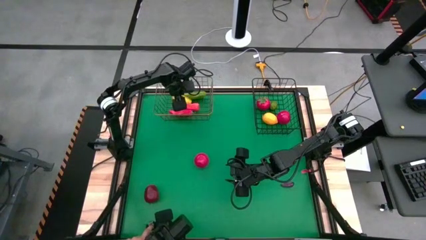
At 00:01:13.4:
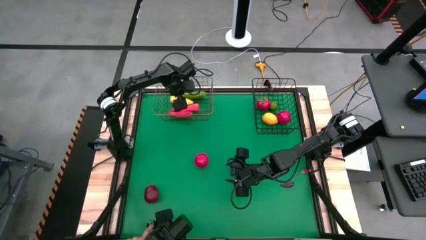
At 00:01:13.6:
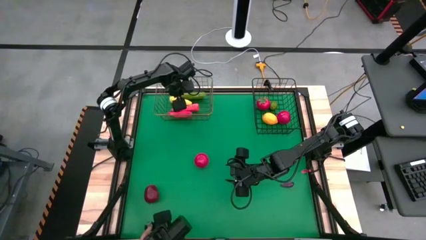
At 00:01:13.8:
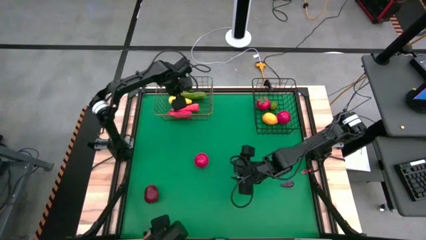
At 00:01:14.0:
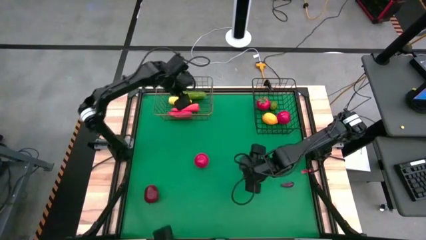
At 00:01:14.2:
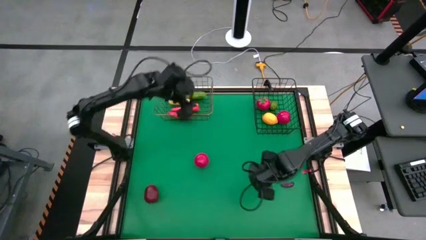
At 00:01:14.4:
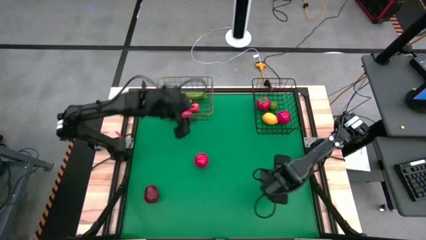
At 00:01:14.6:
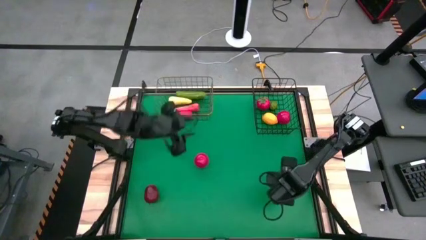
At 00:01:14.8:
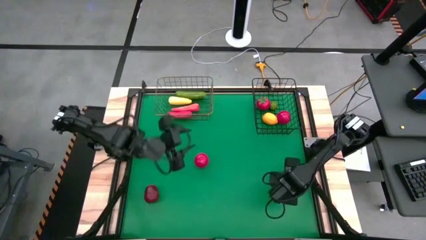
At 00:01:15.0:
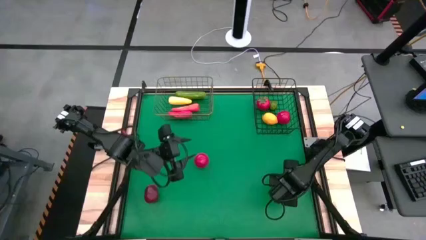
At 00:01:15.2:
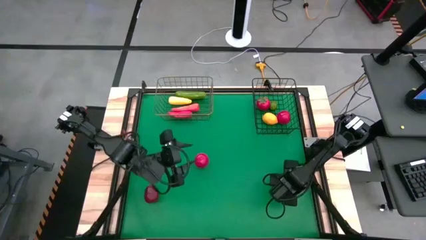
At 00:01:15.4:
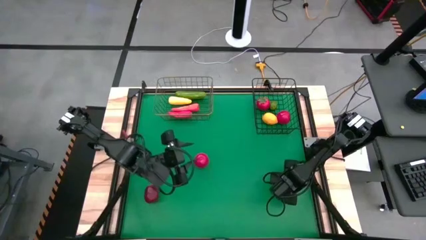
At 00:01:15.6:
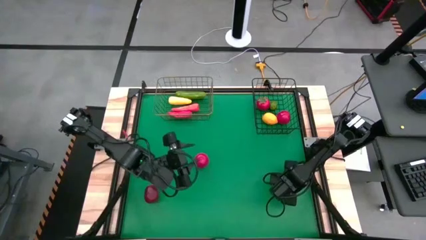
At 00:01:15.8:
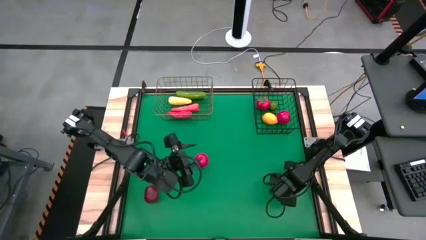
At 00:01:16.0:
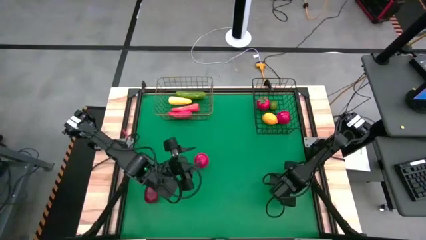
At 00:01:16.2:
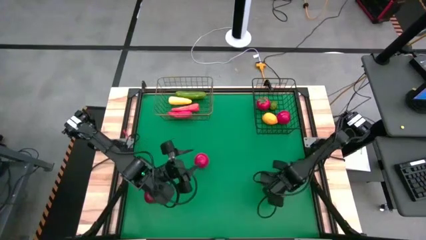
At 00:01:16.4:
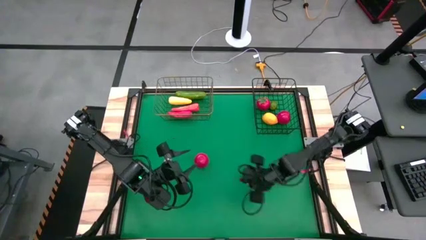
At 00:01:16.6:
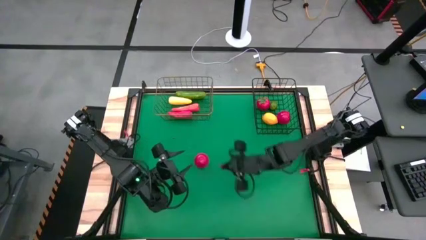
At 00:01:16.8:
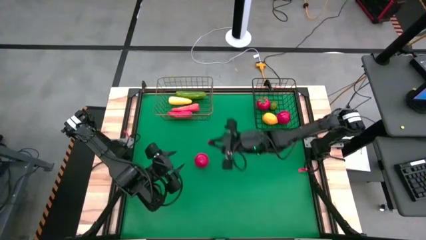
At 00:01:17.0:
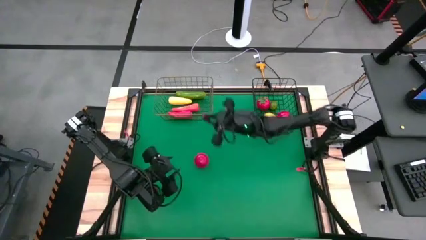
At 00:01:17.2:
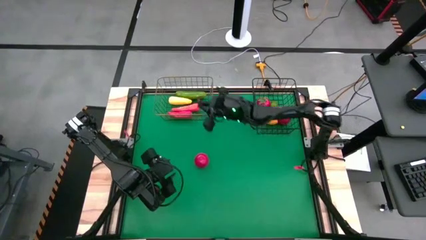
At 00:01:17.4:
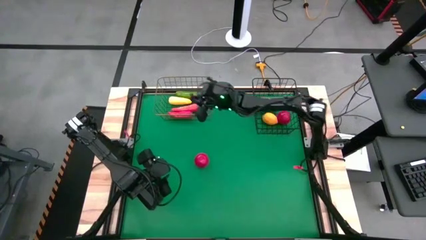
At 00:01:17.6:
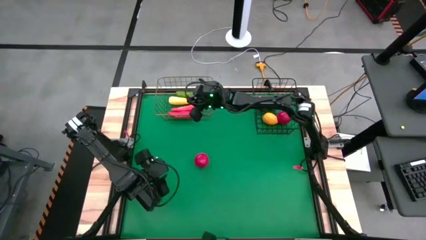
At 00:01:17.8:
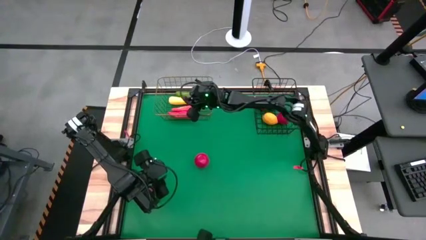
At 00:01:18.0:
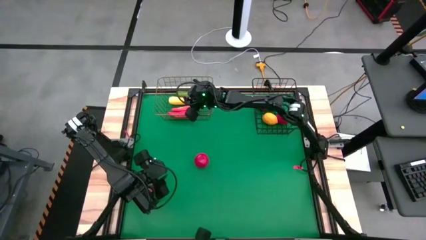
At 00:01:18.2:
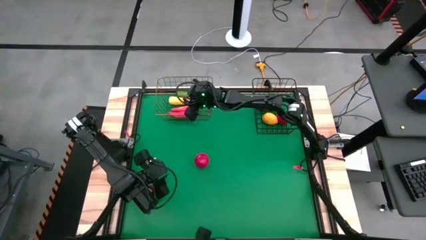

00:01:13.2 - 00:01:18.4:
Task: Sort produce into baskets
Put the purple eggplant into the gold wire basket

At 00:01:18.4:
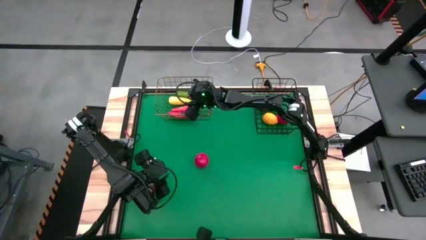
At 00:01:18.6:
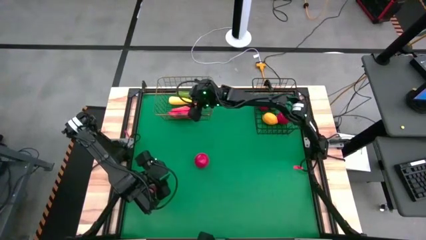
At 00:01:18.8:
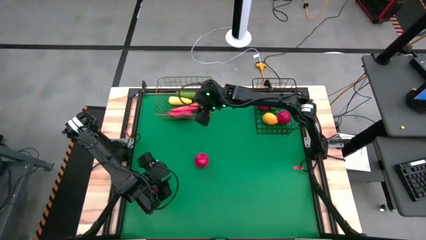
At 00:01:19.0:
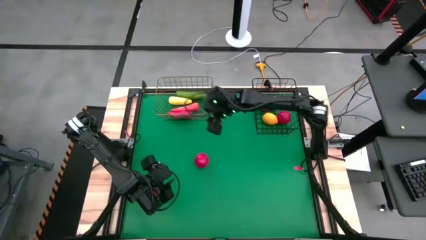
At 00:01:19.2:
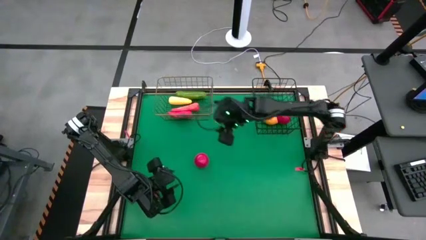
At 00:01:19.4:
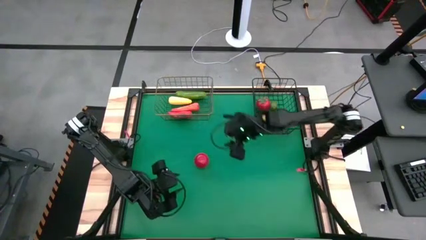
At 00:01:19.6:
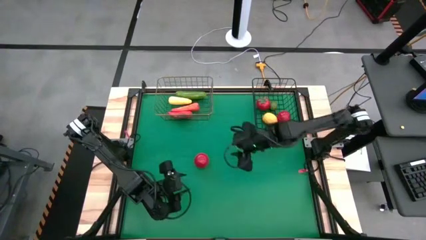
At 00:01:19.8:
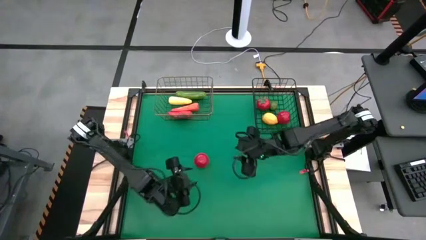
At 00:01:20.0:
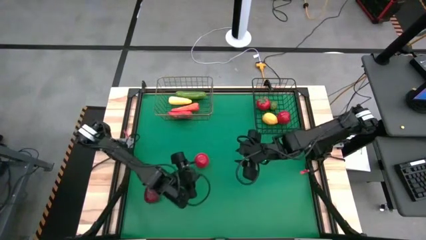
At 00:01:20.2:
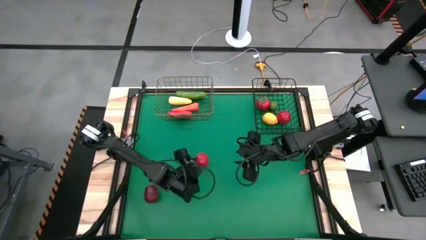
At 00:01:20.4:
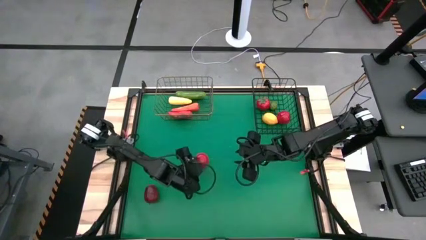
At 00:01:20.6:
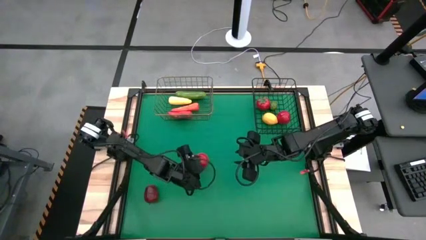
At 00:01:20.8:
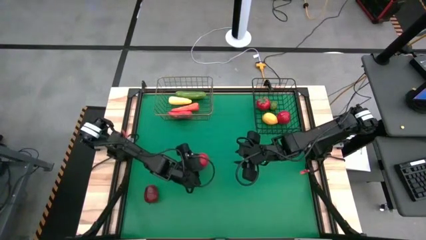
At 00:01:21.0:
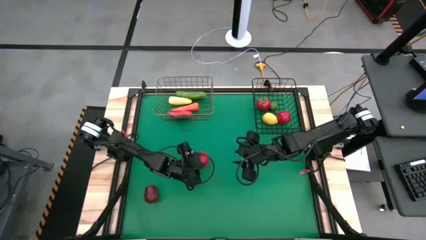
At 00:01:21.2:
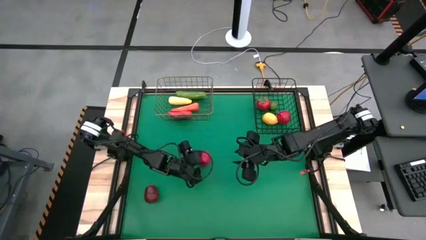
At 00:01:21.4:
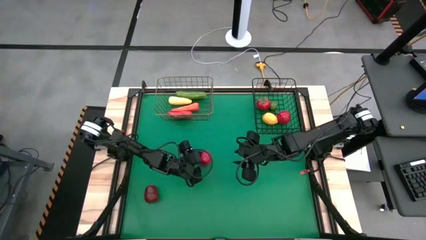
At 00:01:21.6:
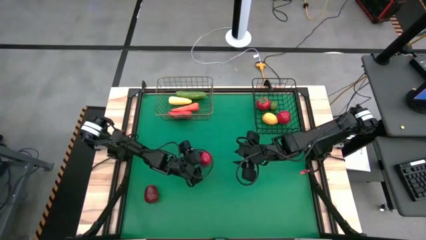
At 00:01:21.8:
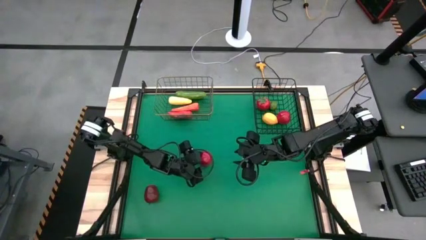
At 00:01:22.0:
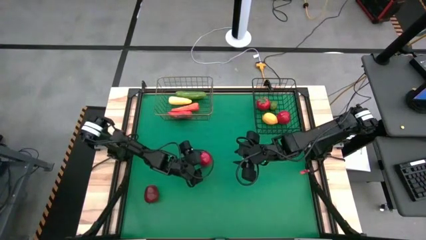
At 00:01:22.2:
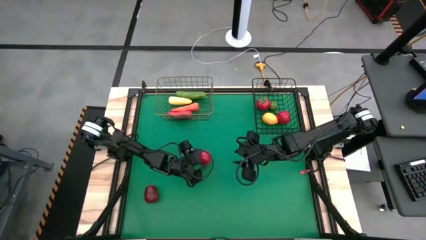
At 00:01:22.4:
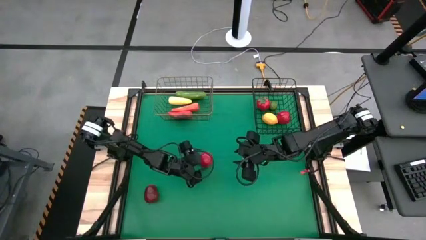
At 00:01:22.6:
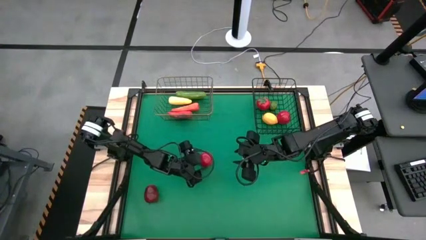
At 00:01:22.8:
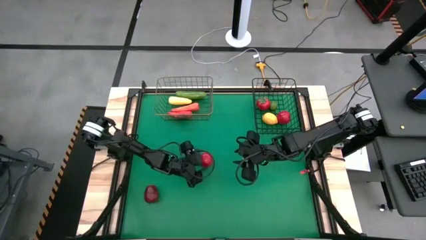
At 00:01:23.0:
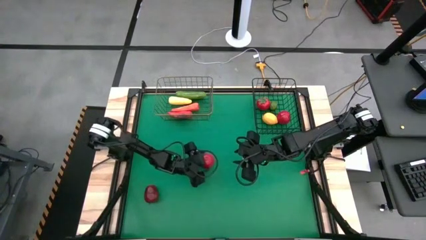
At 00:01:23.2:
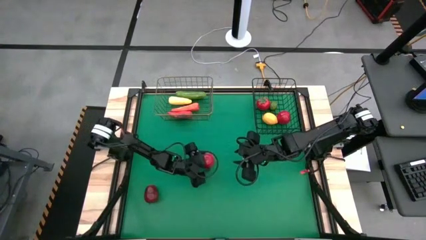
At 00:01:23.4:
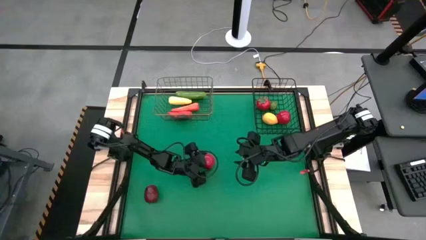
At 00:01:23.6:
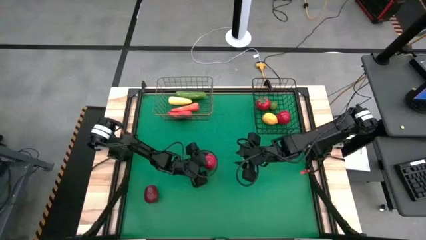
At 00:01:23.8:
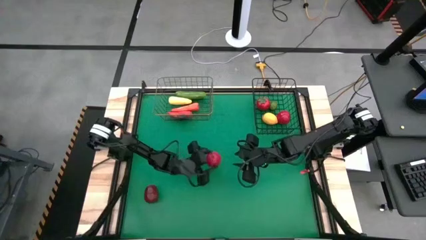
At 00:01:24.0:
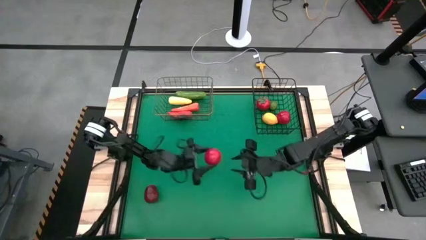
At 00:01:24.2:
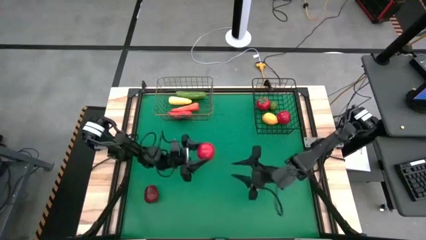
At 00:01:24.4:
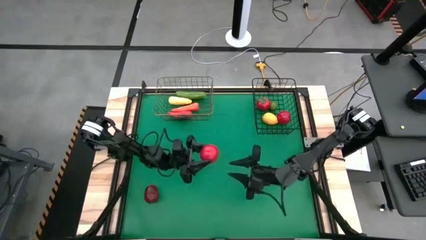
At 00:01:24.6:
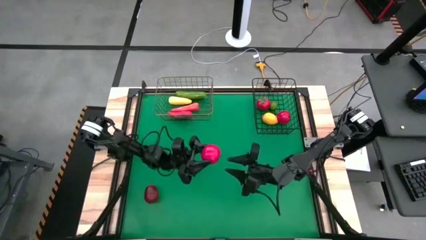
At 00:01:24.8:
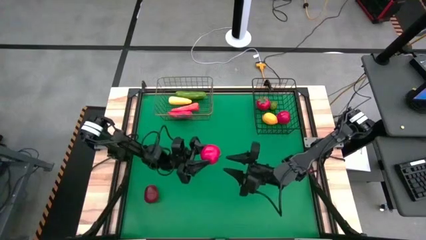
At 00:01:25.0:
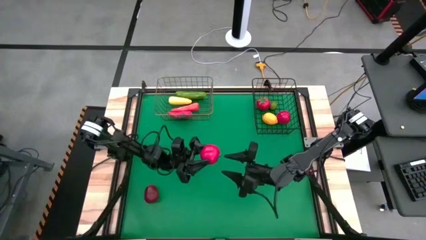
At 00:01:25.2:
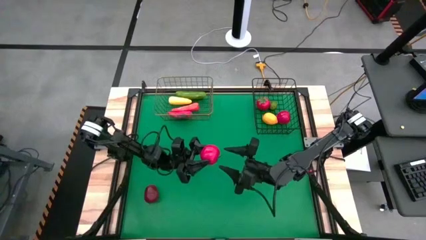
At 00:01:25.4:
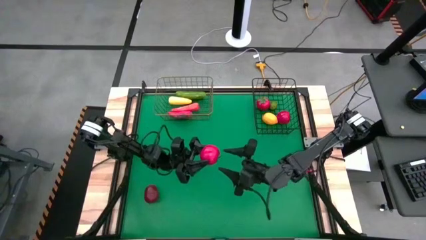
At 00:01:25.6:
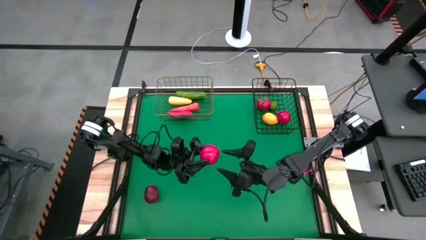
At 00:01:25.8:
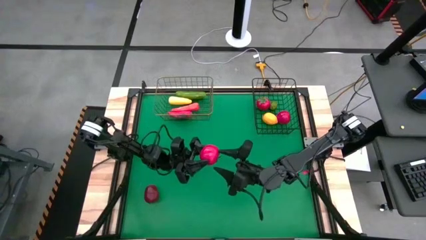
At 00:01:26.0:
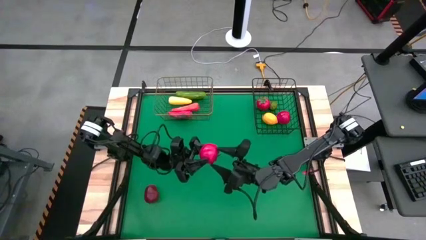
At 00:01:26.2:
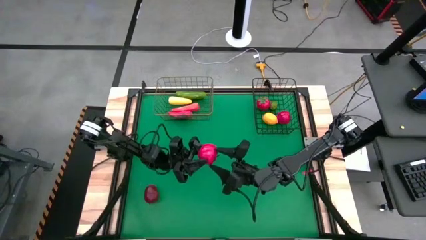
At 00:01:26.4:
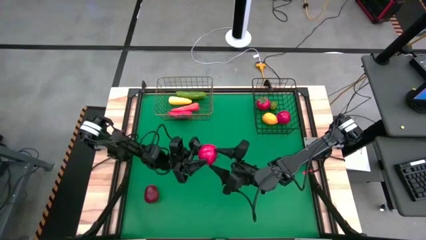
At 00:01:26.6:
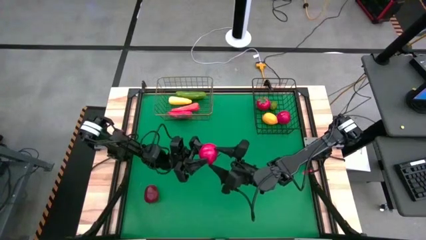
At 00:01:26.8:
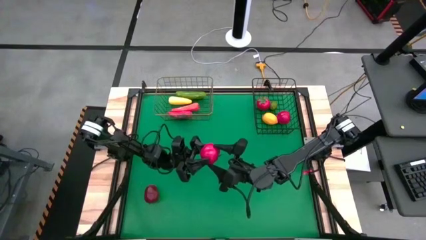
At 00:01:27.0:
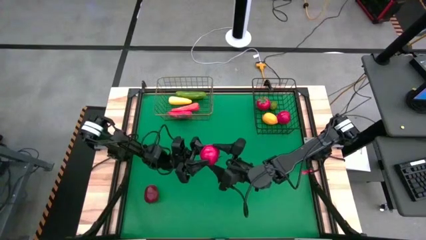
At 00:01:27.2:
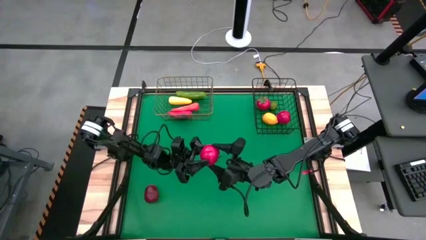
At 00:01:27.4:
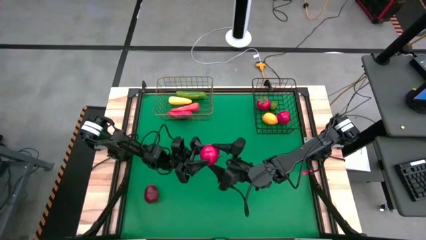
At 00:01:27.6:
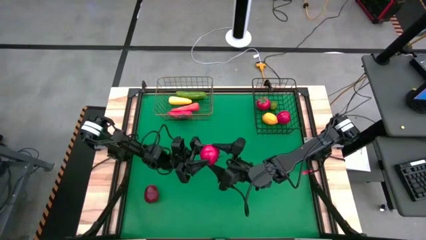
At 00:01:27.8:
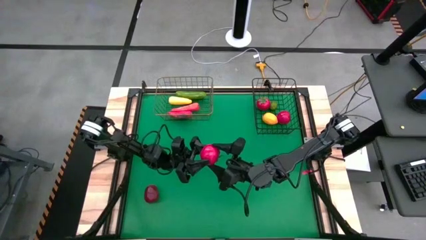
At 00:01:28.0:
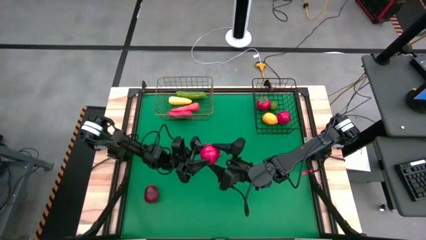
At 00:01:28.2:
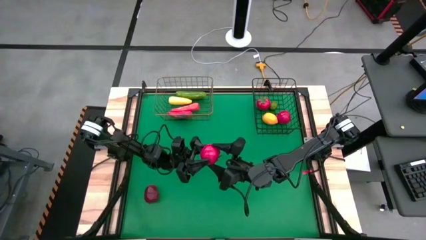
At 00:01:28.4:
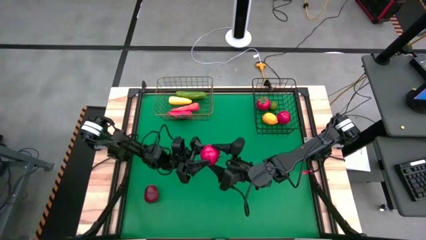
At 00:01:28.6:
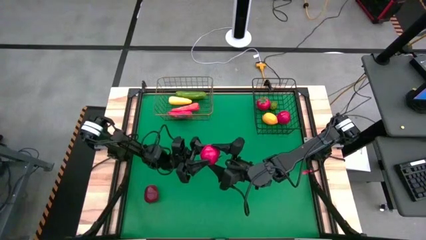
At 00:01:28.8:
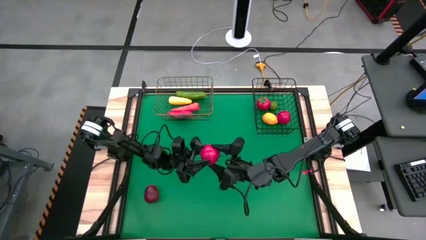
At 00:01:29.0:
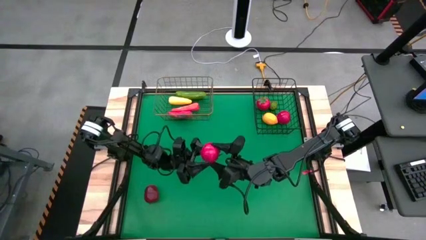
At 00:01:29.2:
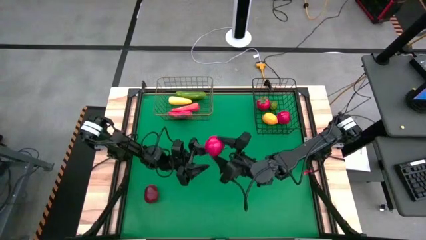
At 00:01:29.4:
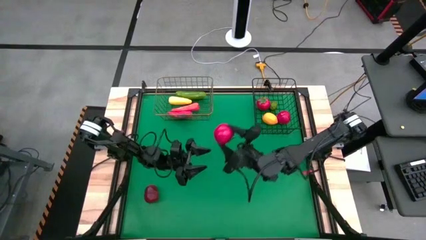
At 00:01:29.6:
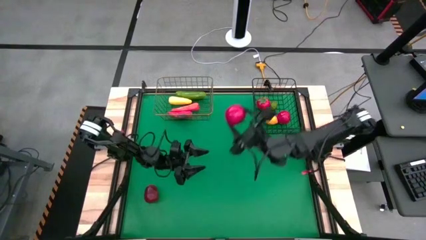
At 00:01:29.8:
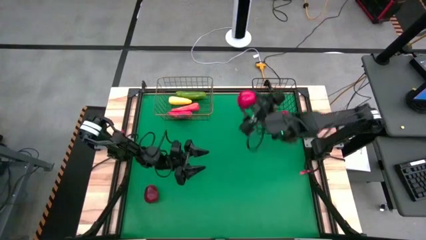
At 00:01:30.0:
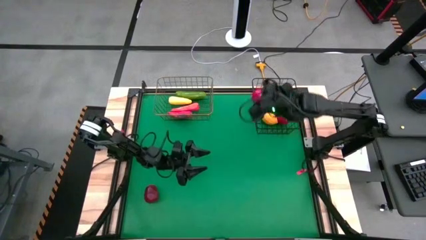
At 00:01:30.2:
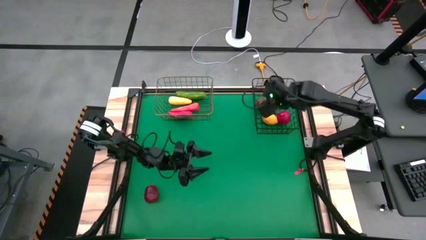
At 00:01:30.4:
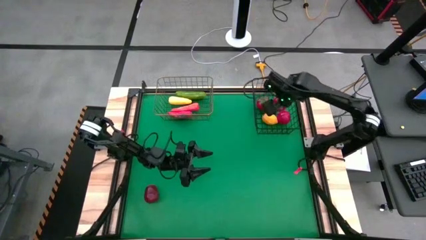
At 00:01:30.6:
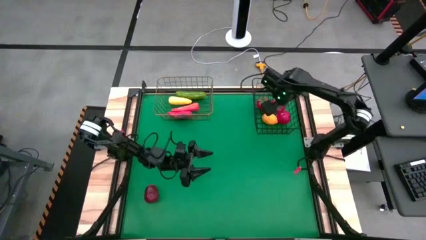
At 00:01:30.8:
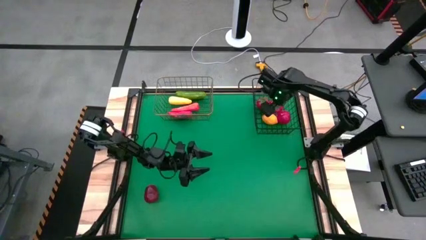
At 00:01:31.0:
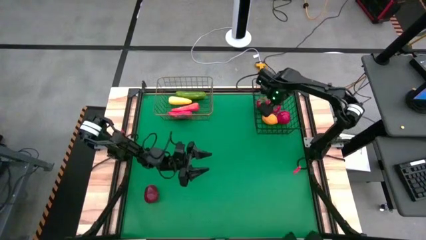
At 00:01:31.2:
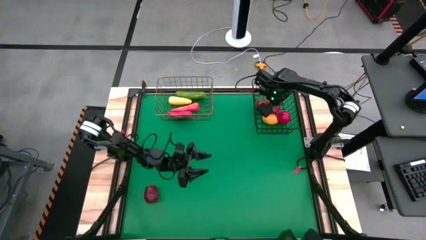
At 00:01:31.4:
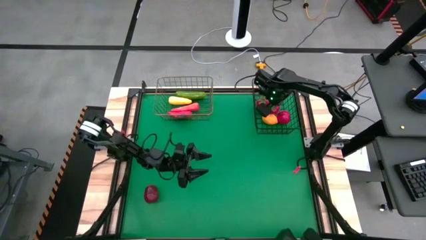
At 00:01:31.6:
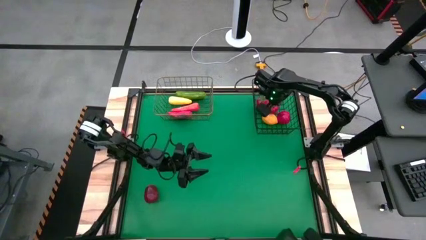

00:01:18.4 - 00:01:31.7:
Put the red tomato into the black wire basket
